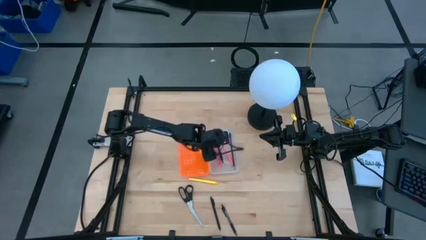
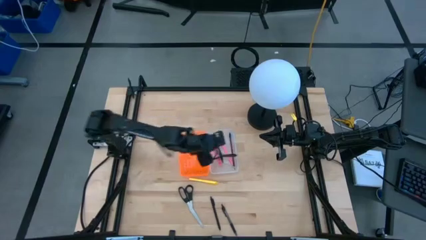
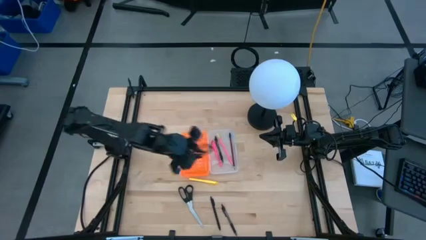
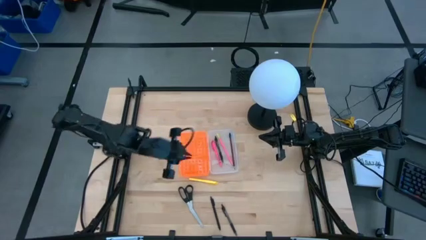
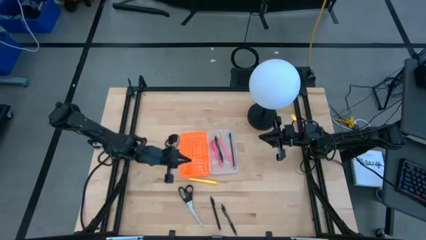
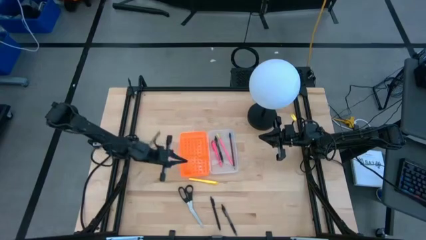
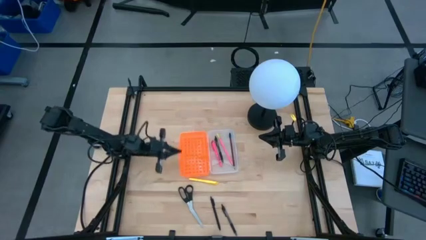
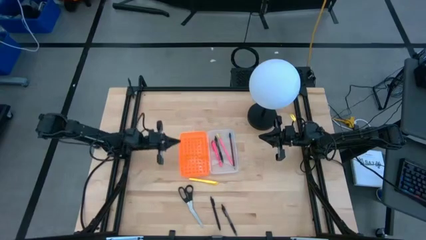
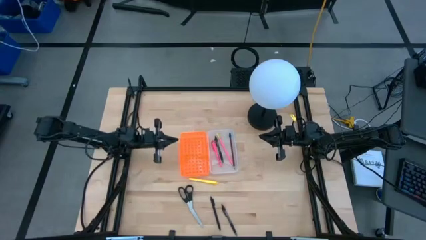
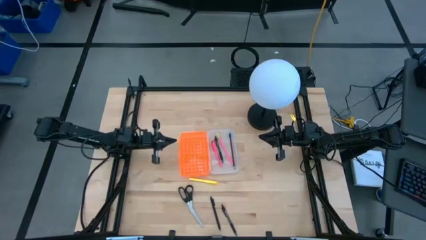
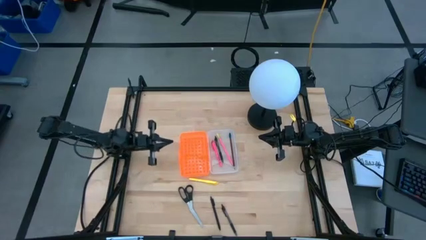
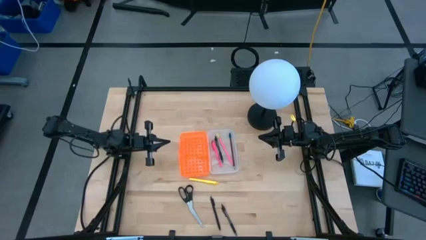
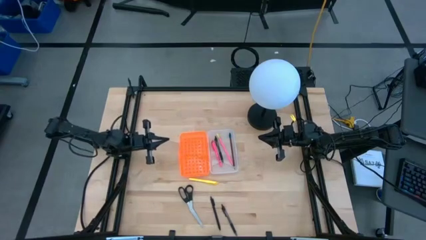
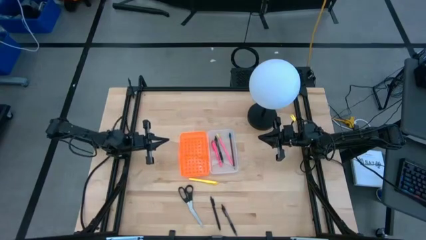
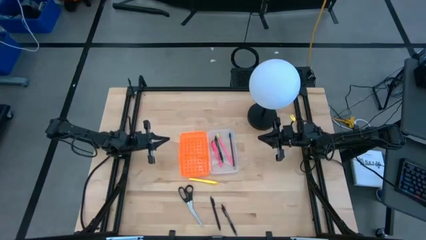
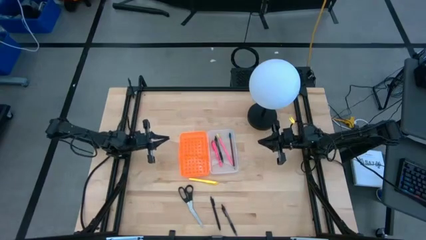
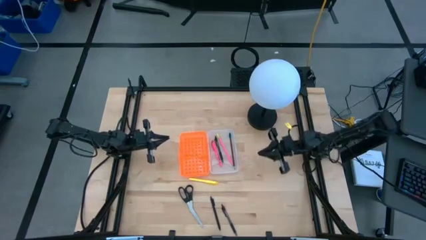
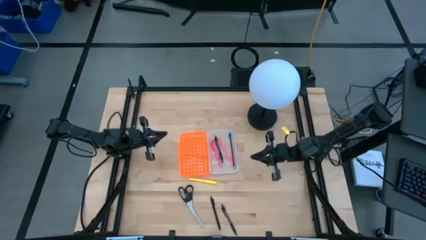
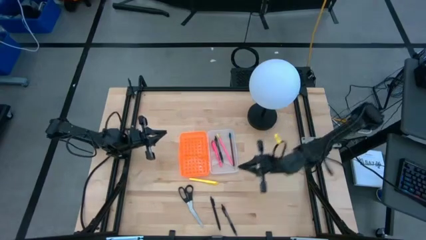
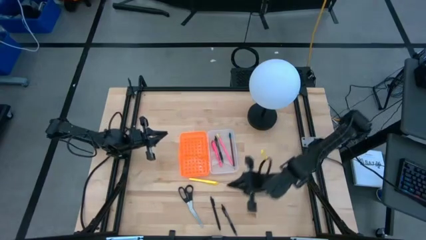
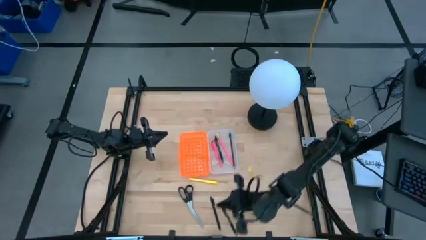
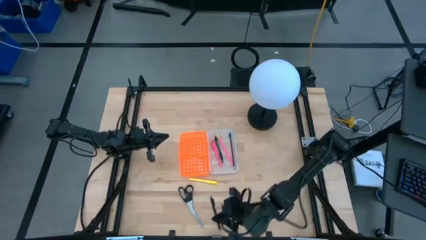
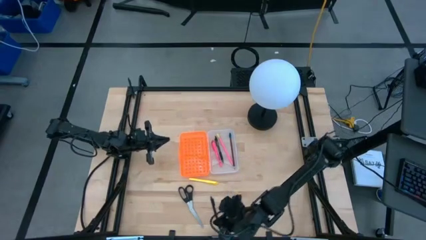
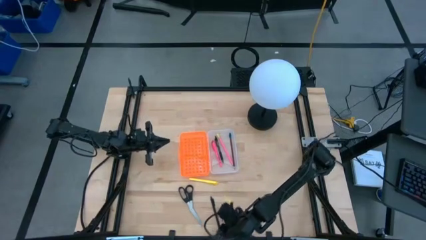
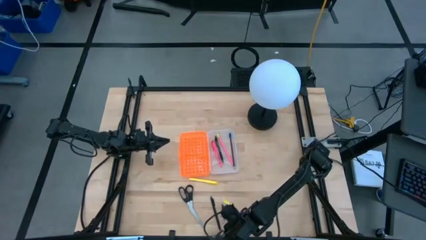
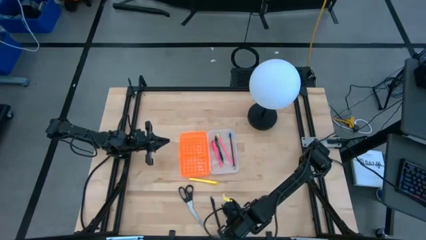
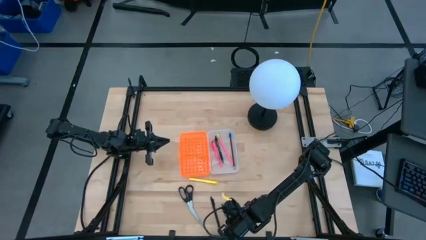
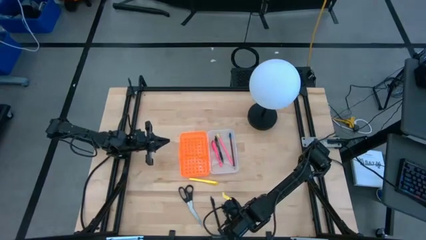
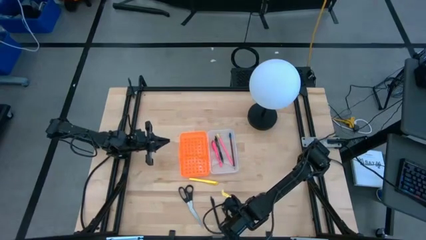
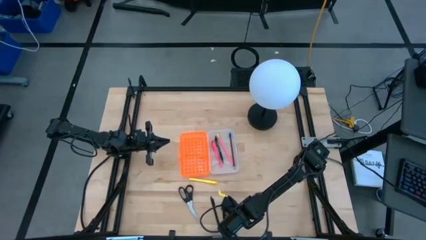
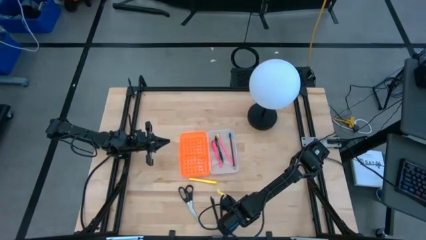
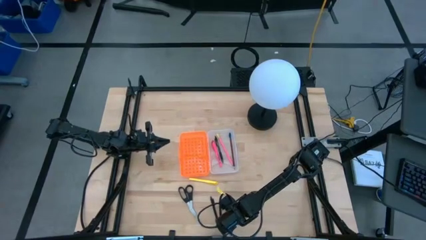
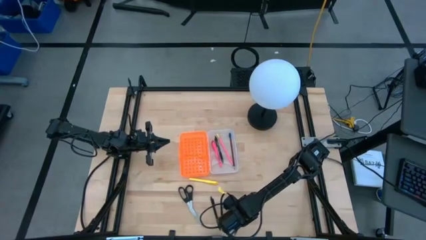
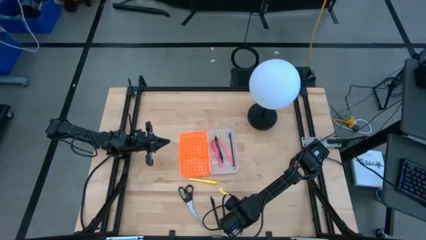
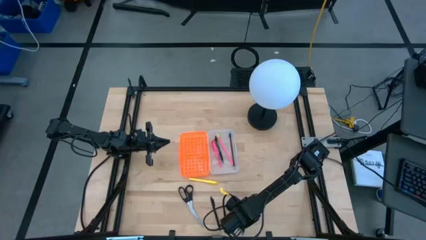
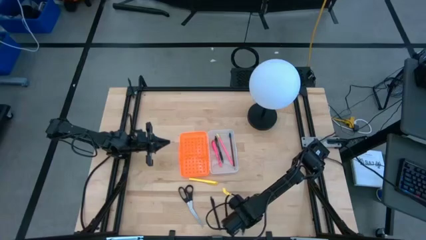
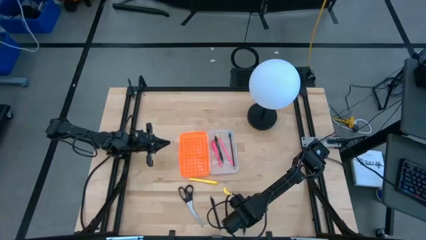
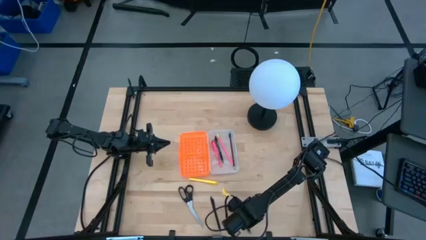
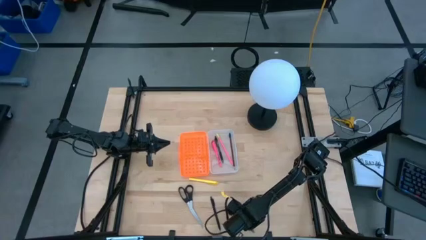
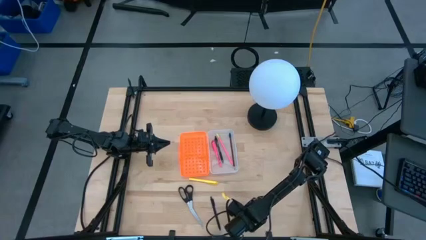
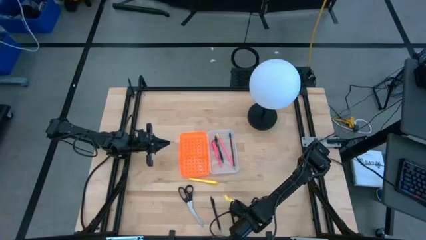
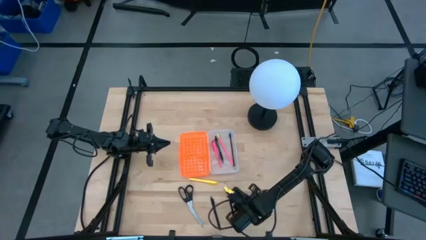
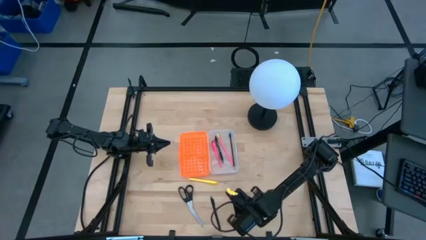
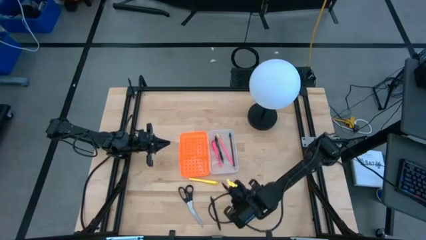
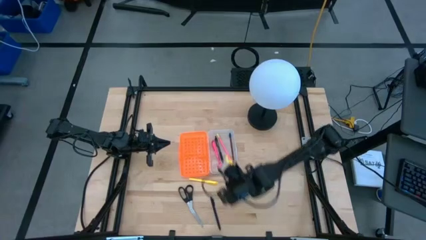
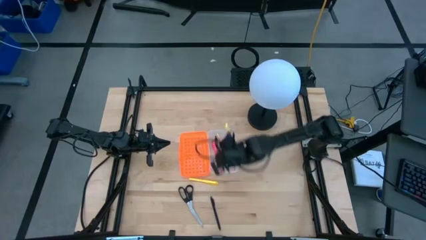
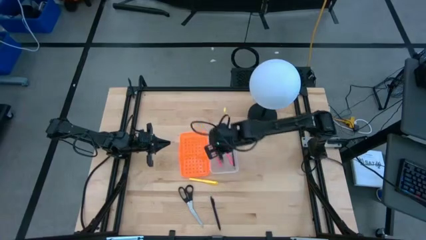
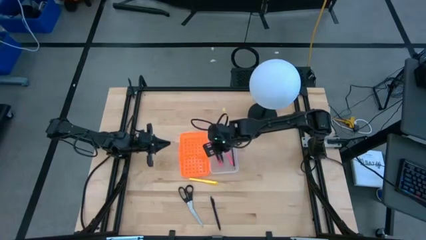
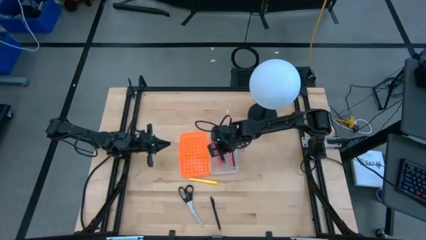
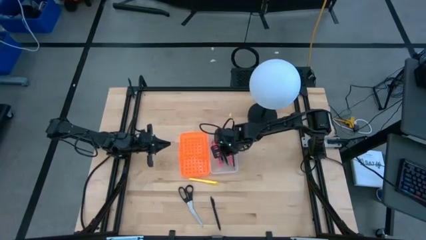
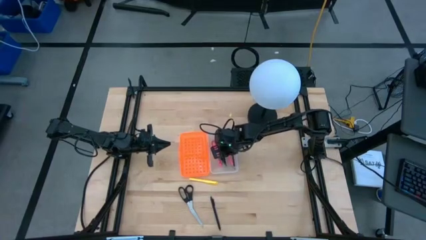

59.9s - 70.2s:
Task: Pick & place school supplies into a supply box
Put the right black pen into the supply box

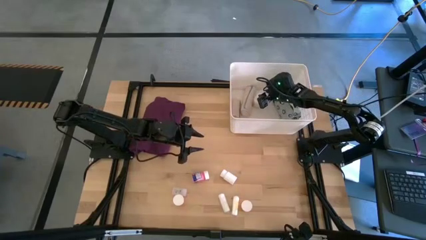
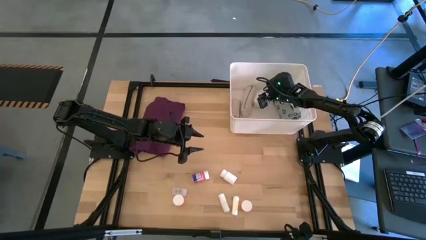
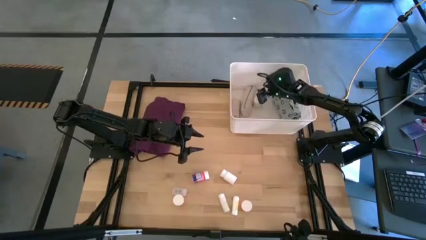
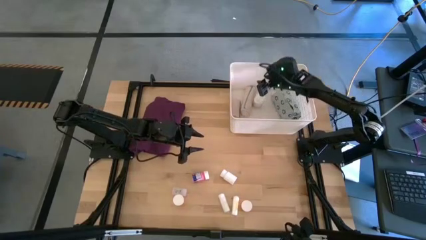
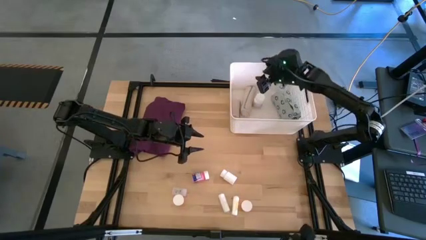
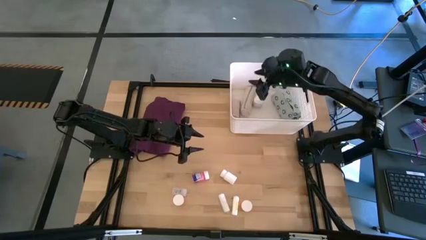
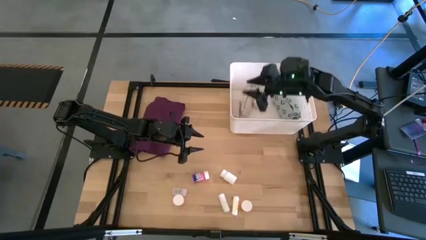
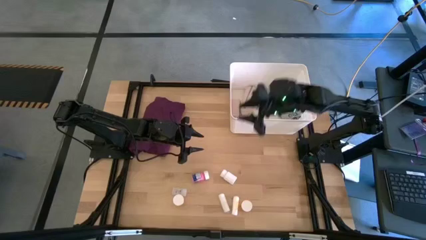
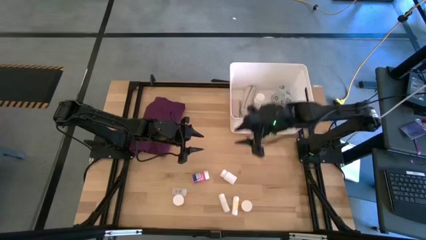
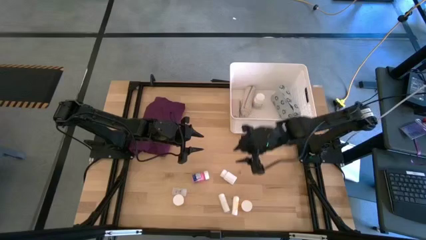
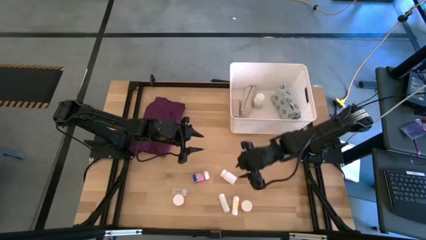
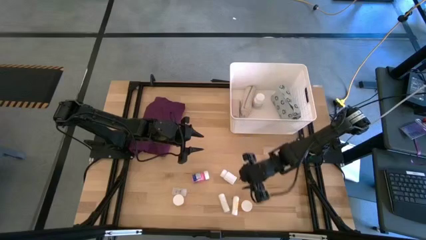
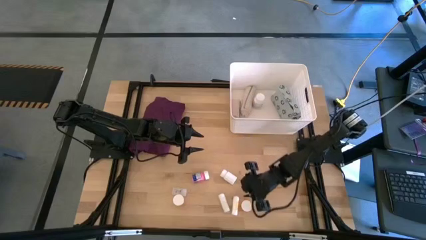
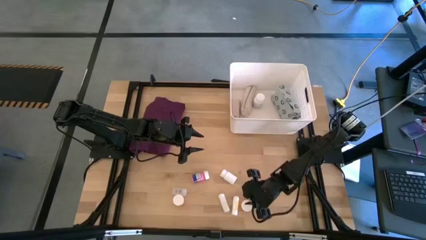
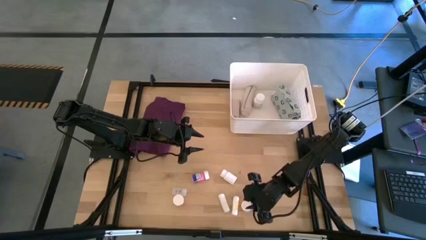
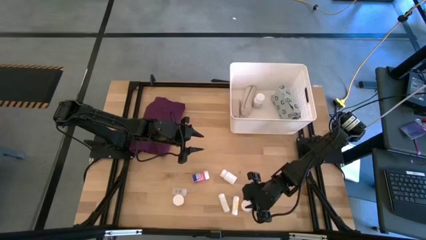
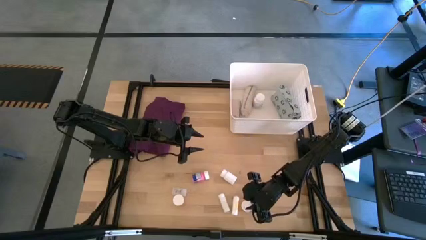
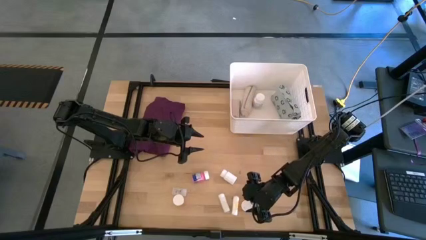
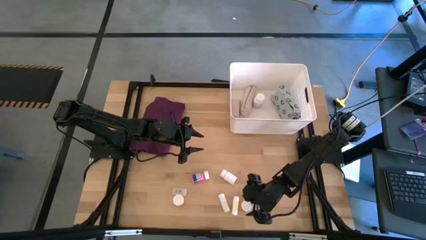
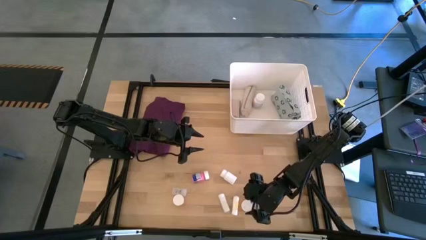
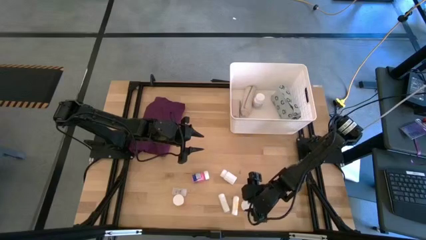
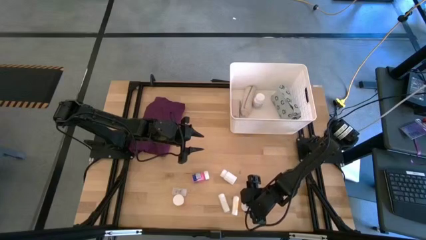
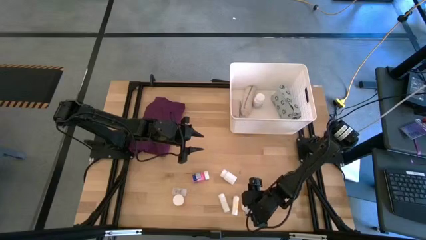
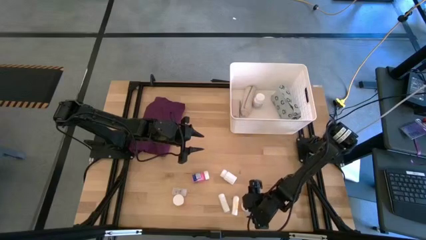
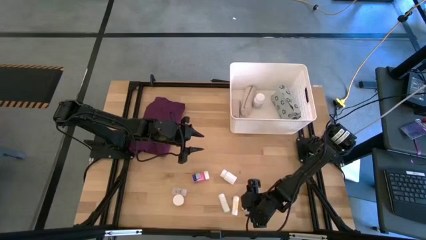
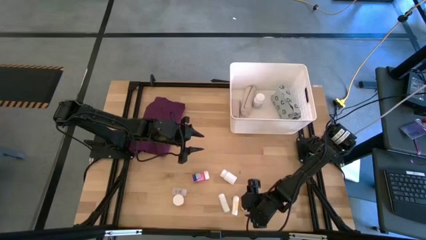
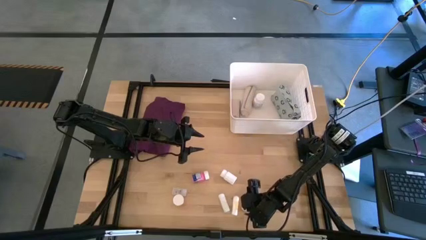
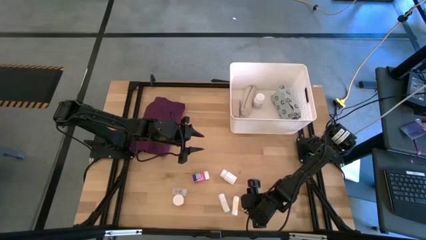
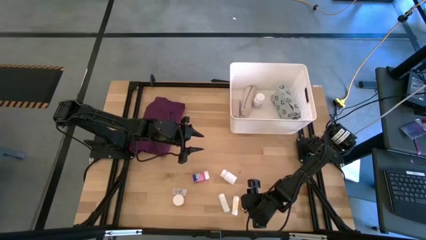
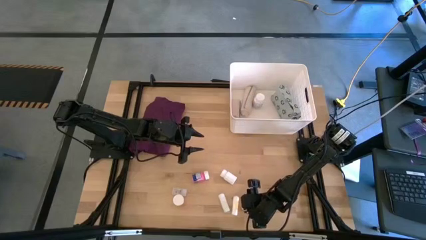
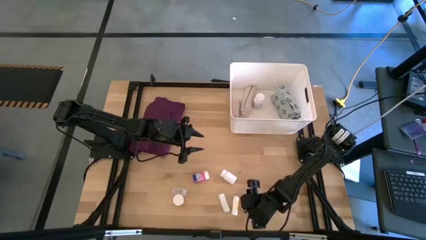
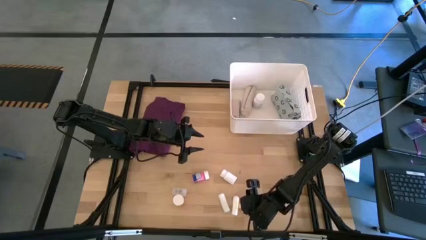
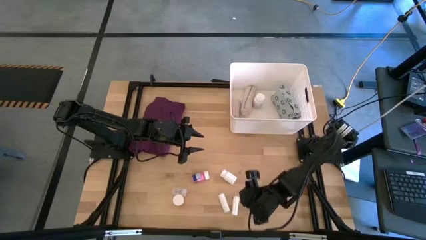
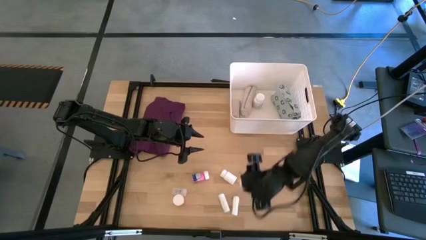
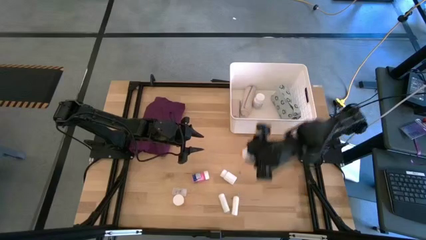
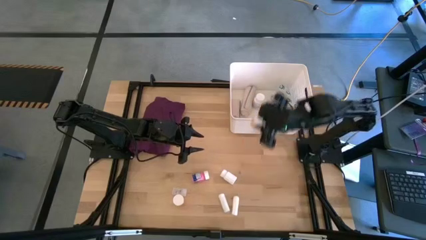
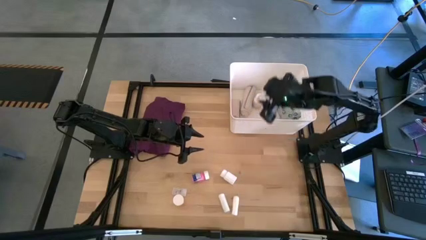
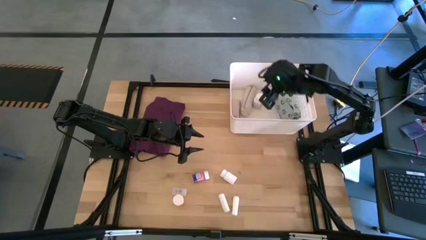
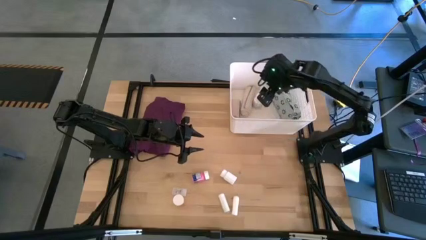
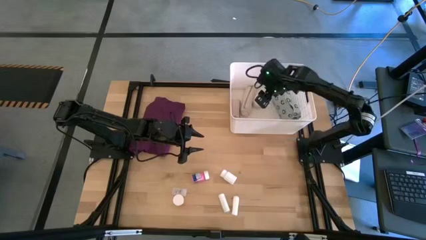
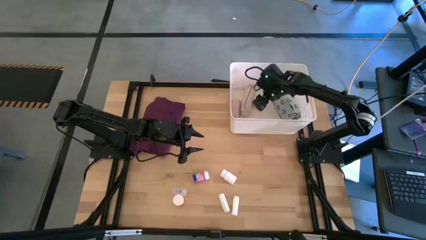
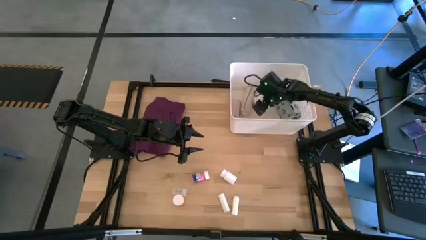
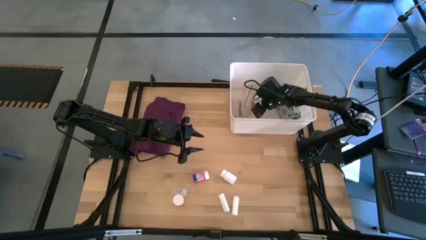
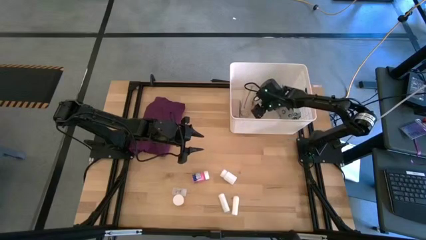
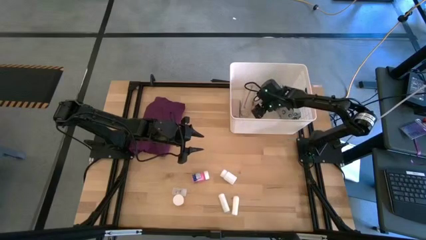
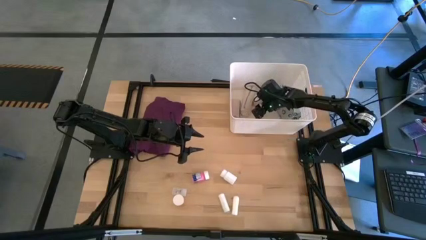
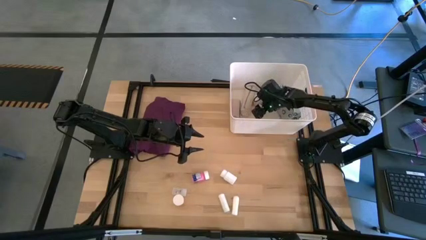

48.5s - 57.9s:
Task: Pick & place medical supplies in basket/bin
Put the right orange pill bottle into the white bin
